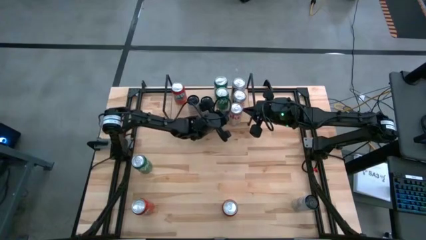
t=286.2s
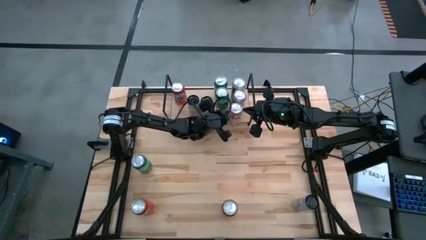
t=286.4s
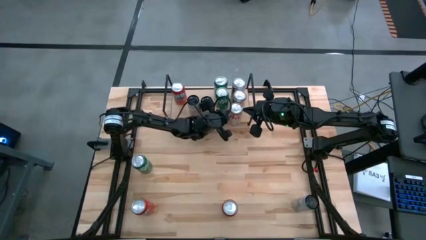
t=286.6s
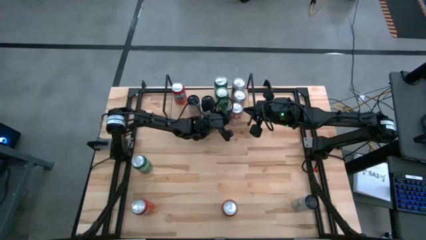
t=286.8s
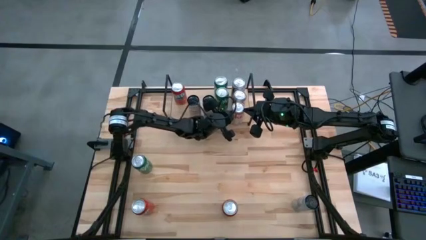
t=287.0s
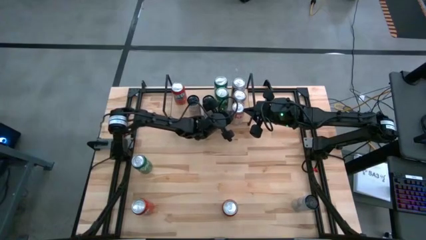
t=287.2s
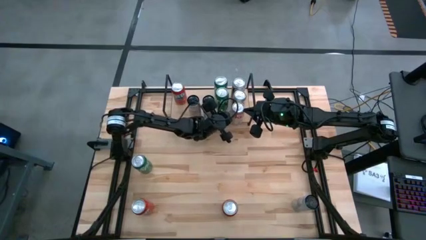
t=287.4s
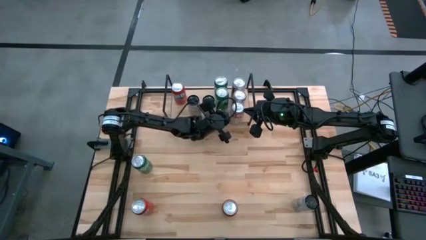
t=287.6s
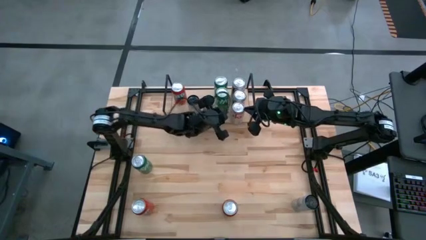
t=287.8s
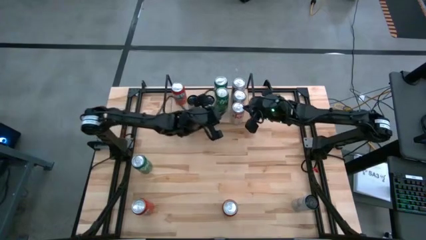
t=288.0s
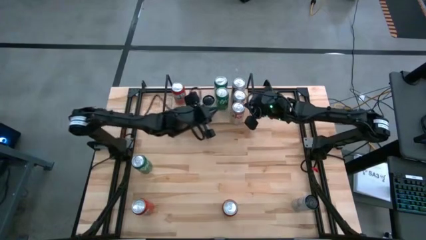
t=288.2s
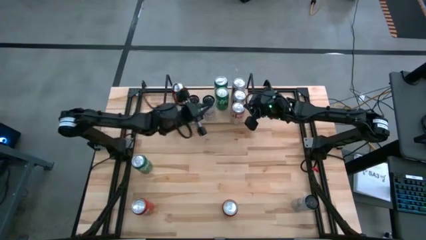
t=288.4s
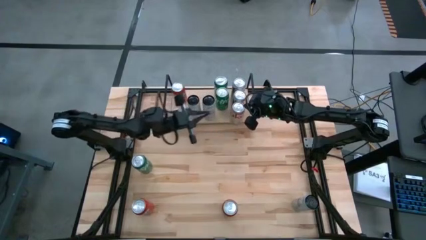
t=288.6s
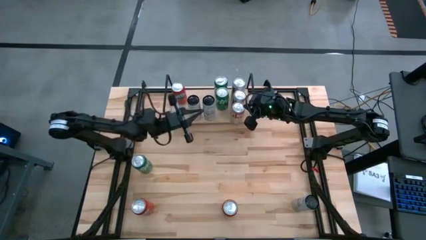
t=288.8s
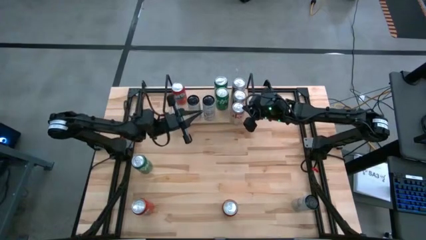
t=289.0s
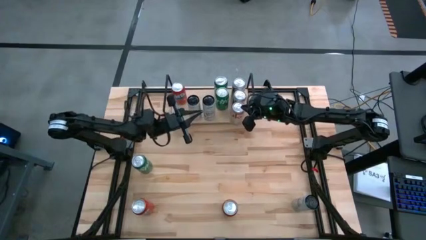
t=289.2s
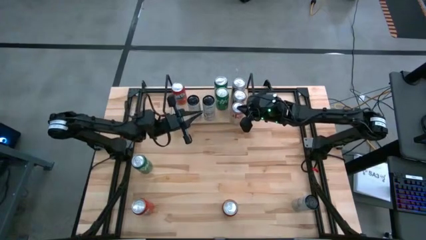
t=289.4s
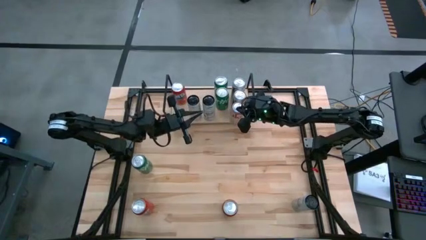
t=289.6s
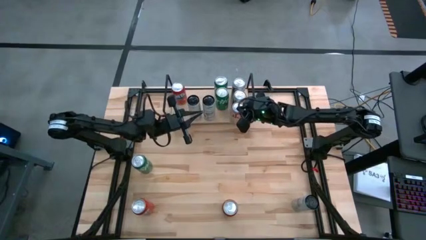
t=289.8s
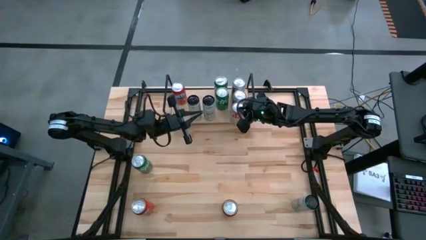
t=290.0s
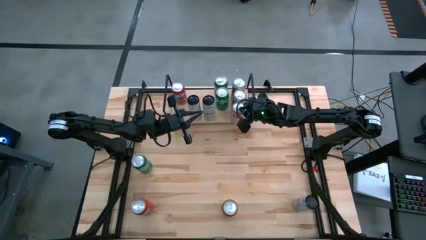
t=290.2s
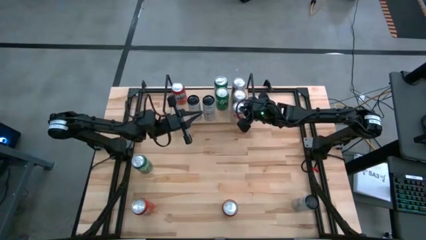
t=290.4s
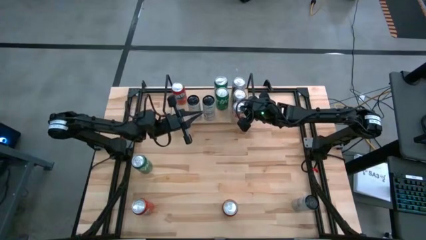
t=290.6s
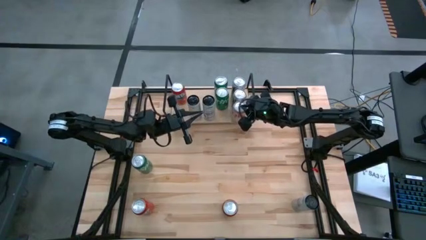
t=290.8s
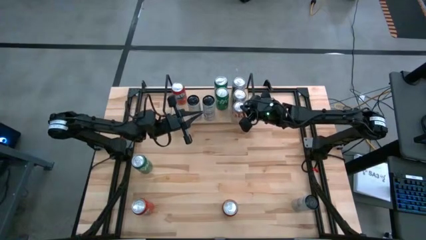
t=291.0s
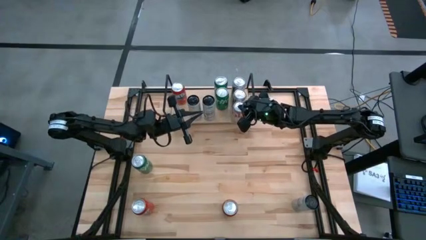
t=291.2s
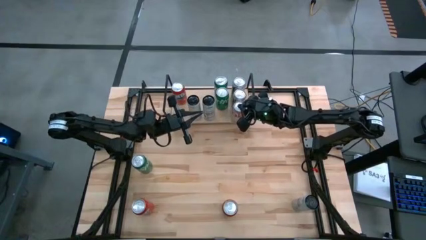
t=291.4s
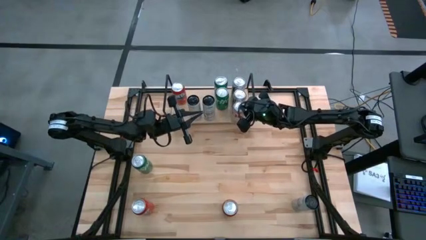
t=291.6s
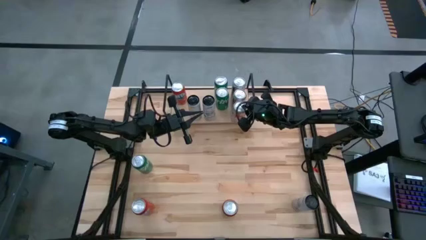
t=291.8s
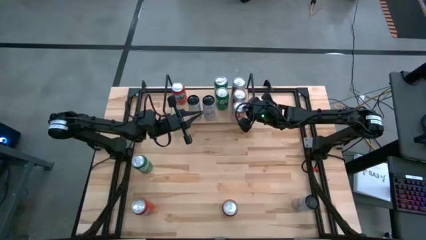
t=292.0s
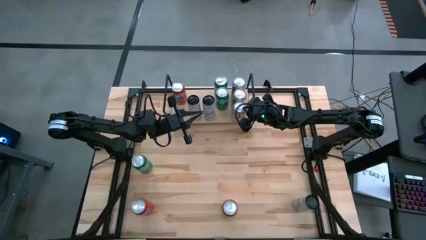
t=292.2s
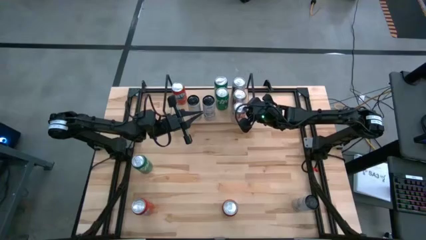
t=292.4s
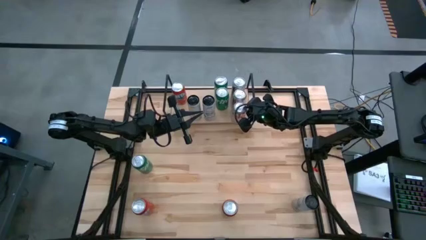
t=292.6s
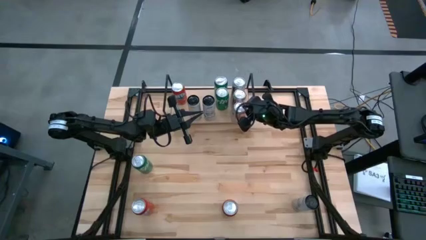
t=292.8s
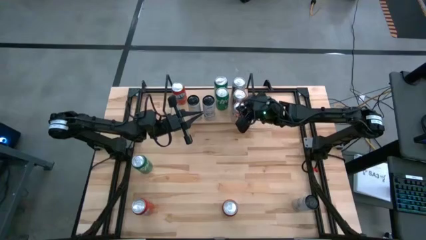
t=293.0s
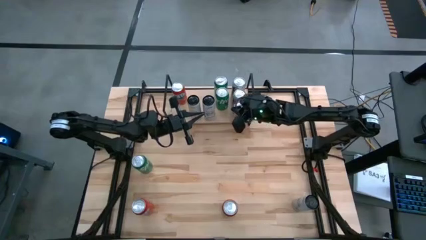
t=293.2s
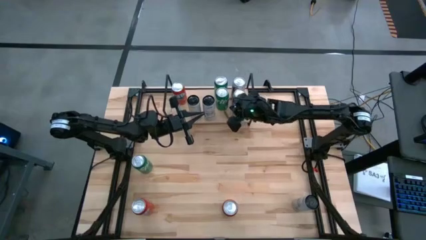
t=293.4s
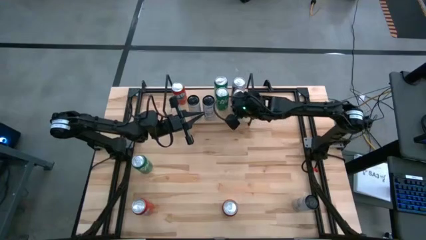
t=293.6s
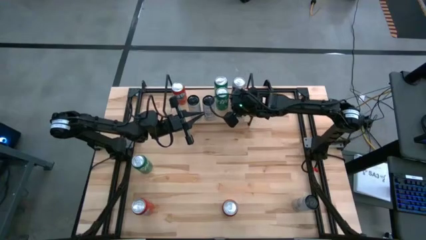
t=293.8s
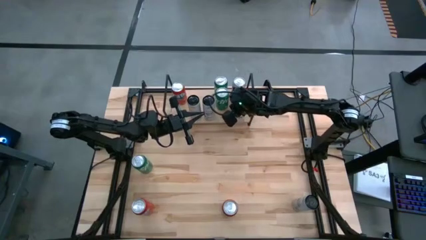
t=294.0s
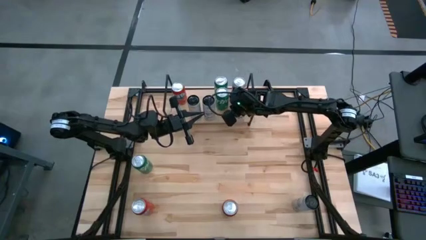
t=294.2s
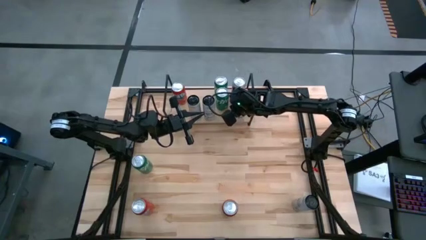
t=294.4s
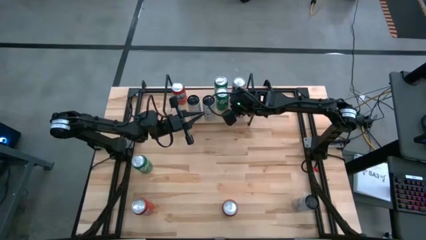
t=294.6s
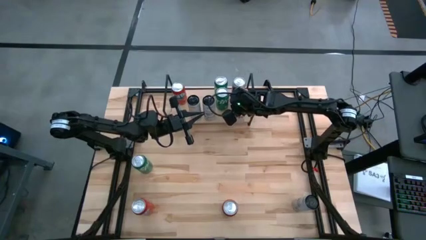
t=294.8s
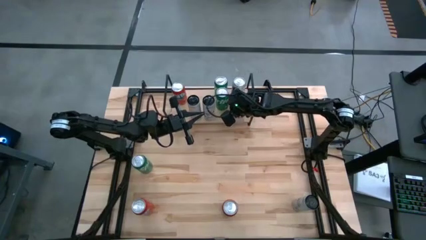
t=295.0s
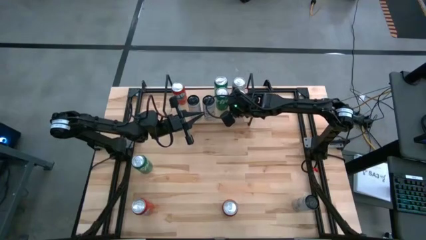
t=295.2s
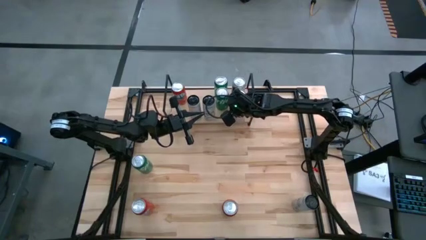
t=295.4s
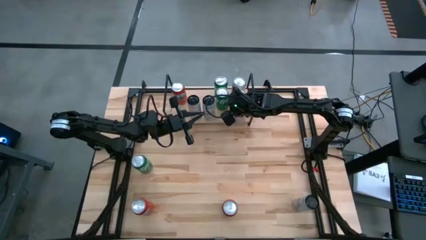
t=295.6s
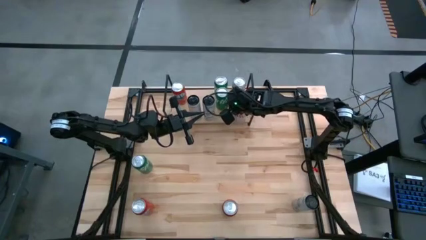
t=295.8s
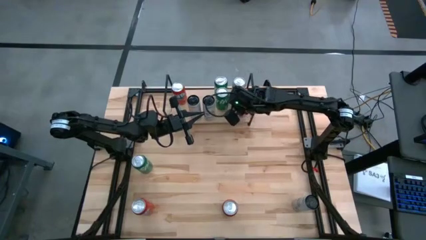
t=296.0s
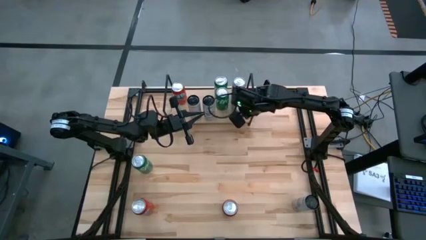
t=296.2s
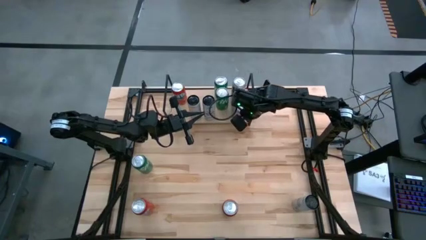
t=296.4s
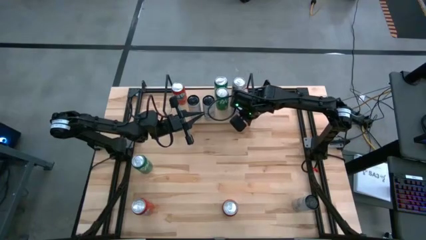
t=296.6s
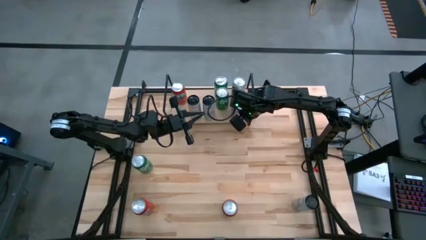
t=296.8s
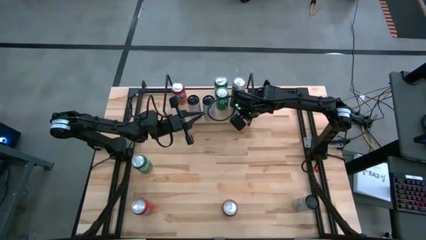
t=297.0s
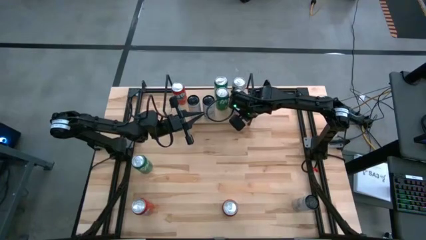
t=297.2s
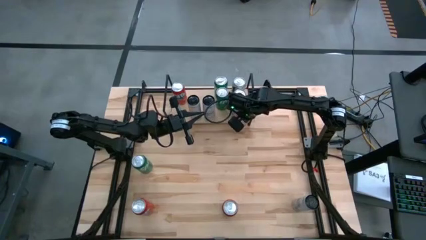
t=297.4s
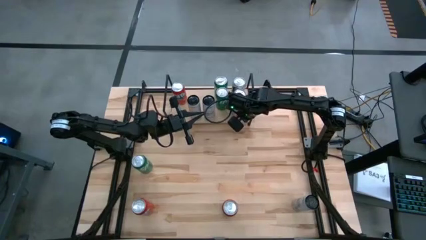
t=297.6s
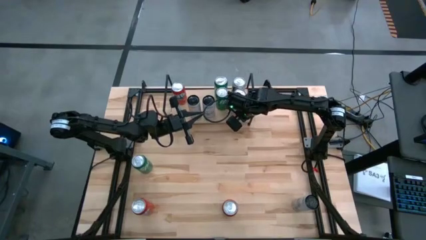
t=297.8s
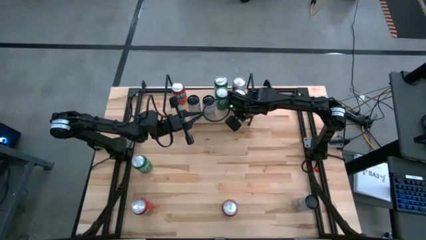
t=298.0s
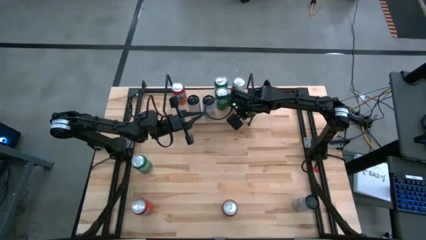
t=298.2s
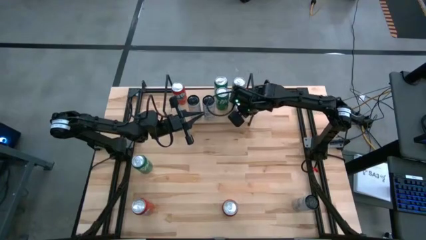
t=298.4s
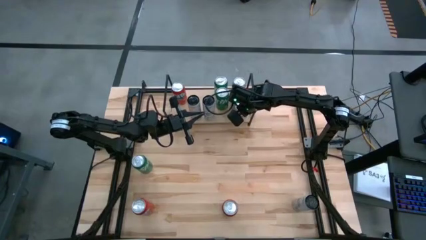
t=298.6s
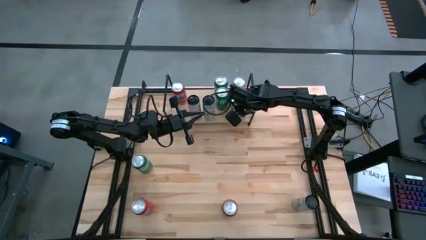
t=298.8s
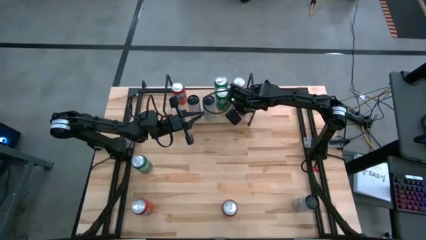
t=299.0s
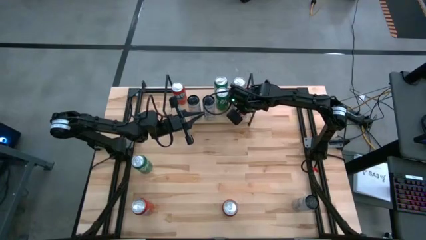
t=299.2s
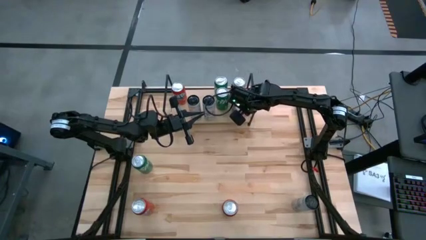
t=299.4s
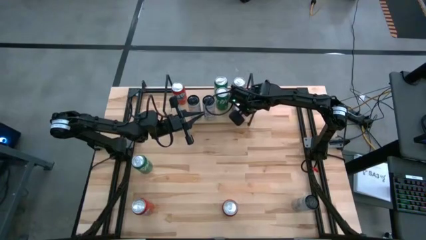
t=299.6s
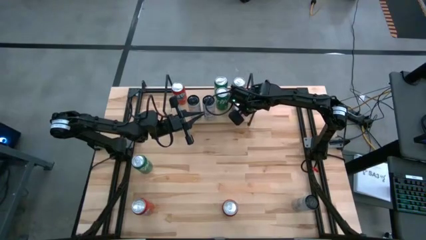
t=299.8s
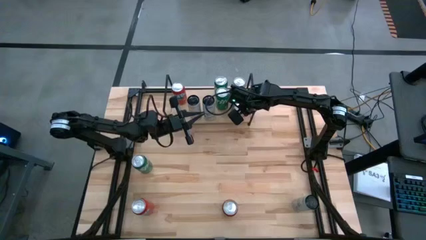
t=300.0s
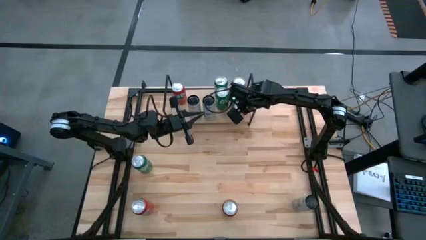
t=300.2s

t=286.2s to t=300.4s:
Task: Sort soda cans
Put the red silver soda can on the shelf and align it with the other red silver soda cans
